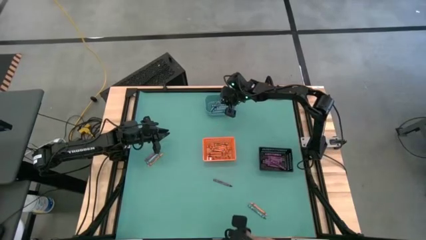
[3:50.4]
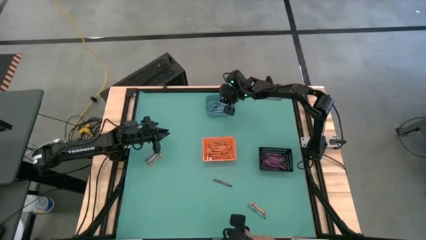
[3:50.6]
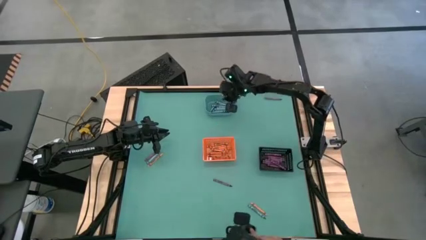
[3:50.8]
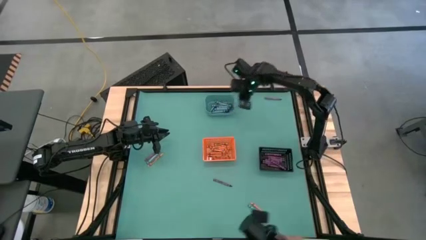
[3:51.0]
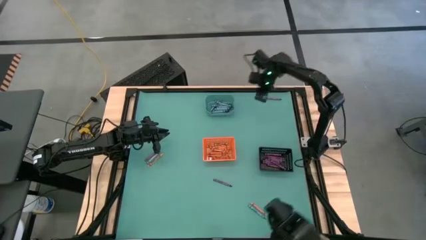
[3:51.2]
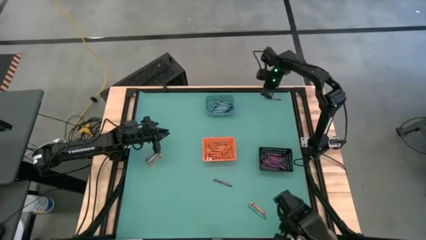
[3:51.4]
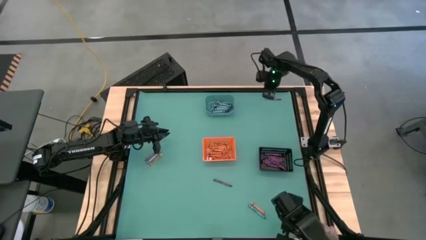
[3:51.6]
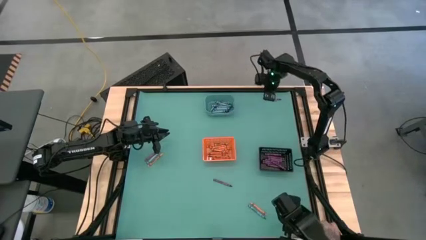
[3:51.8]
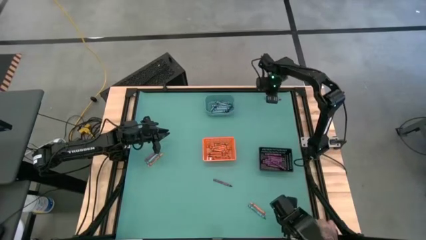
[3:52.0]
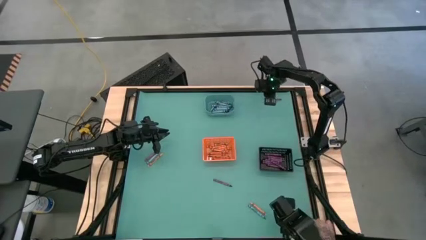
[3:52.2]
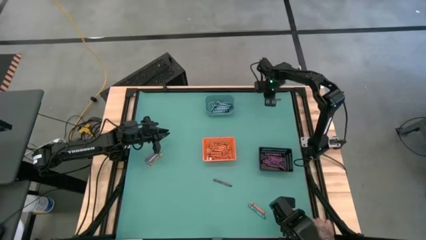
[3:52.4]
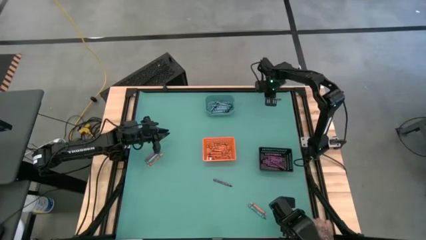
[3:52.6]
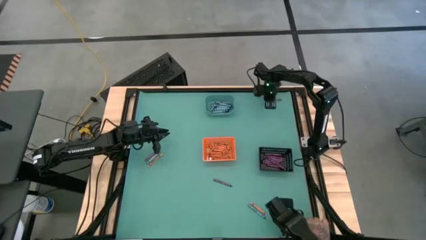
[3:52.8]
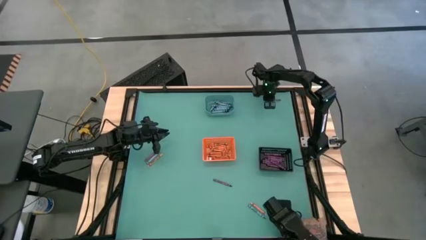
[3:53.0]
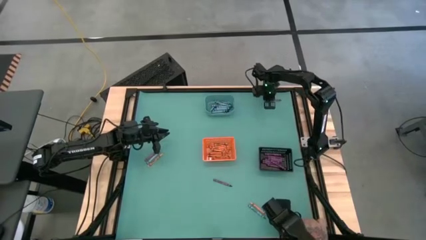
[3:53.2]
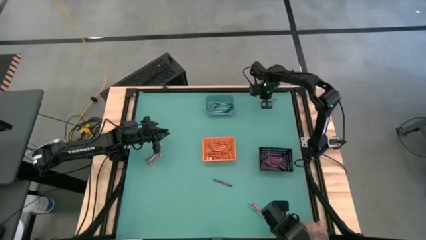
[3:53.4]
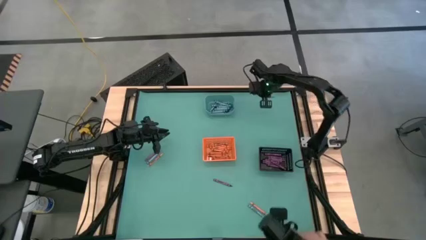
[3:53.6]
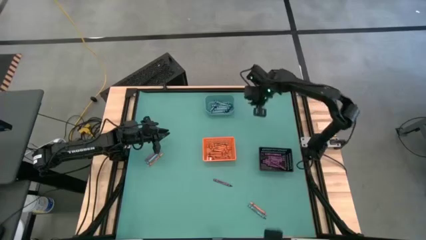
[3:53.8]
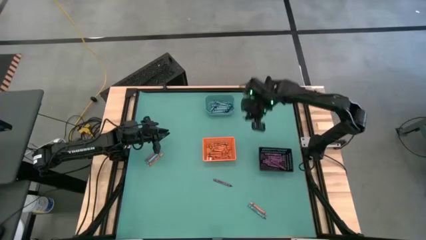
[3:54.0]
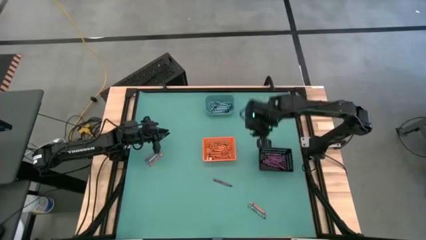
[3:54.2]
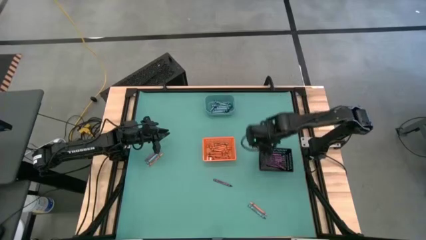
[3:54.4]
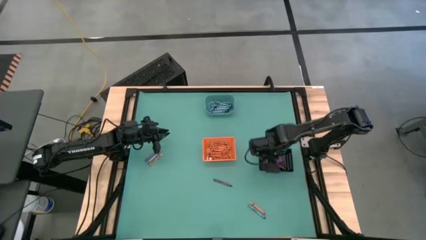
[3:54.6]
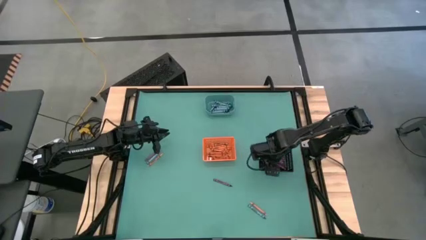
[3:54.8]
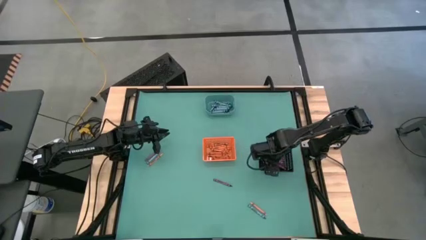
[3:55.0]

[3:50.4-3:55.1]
Task: Sort crayons
Put the violet crayon into the black bin

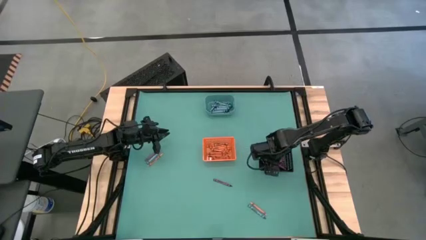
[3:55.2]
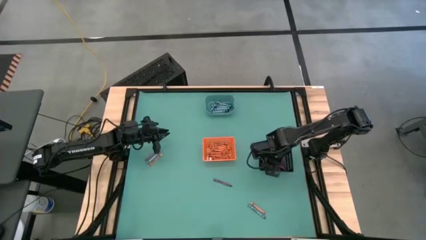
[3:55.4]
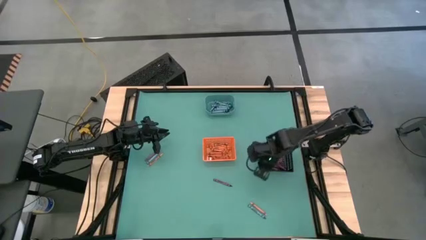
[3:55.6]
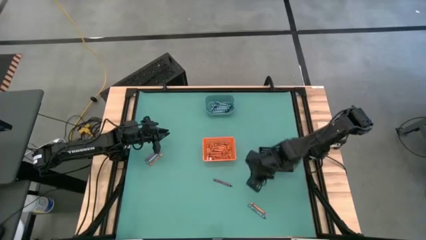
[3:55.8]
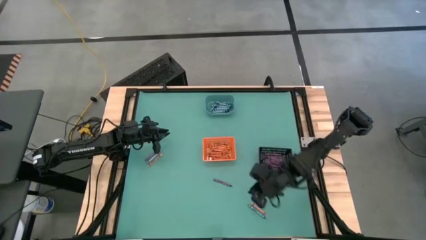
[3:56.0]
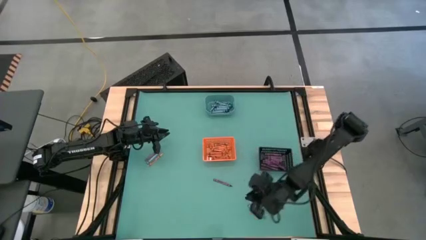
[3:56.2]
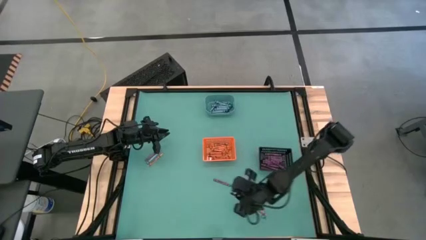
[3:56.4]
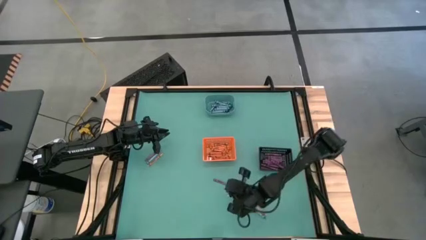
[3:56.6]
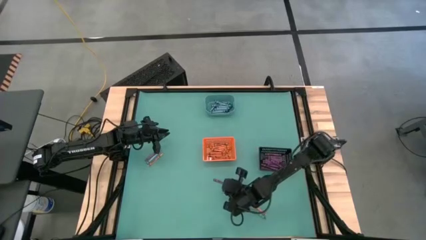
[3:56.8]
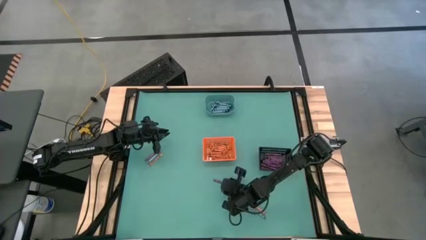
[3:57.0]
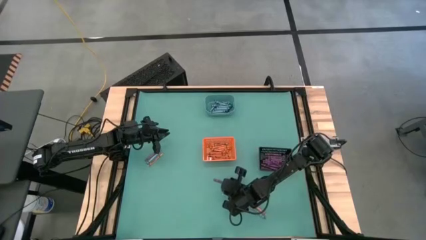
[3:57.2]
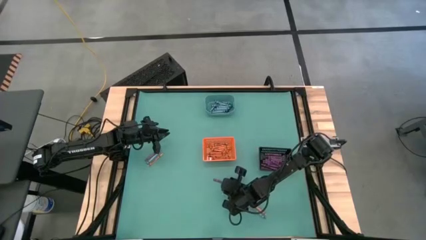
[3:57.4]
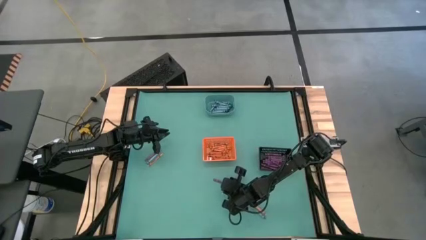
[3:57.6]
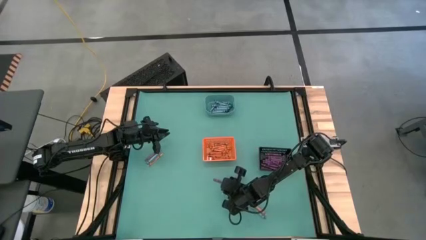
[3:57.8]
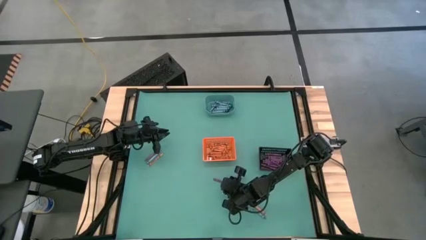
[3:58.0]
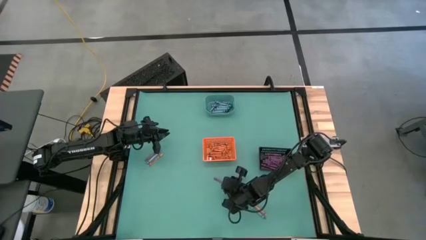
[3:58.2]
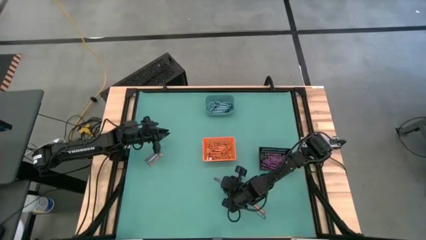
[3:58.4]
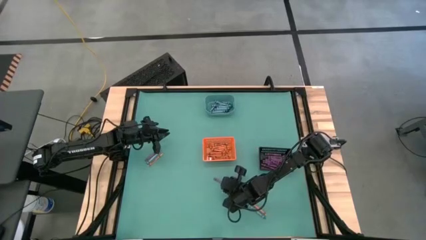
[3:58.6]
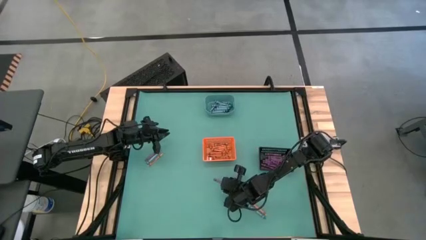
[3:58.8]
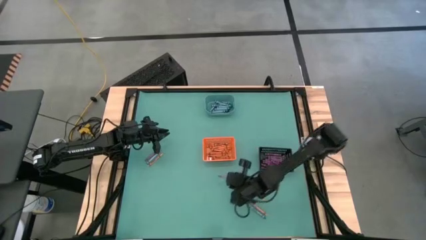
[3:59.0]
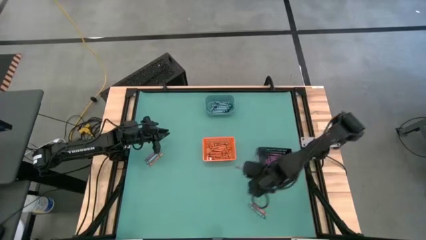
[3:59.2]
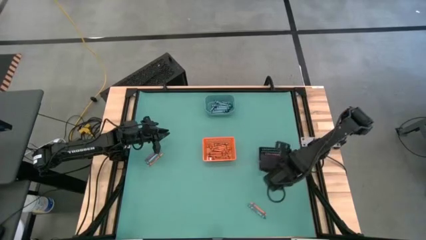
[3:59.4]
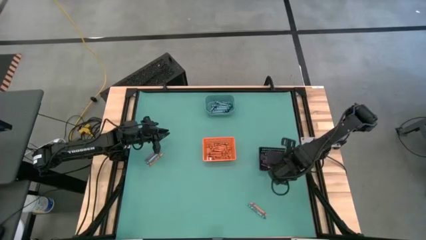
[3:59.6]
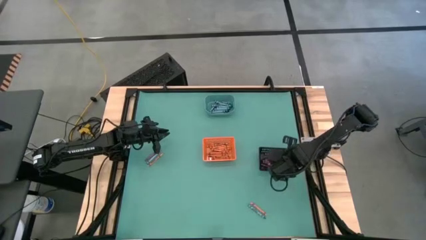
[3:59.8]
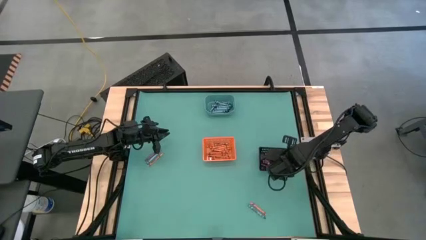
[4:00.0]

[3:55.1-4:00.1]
Put the violet crayon into the black bin

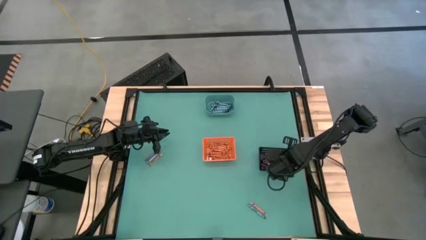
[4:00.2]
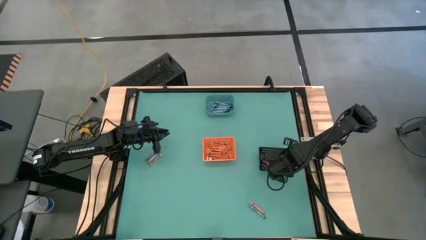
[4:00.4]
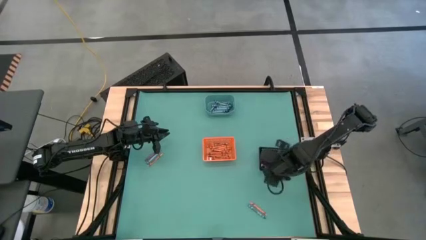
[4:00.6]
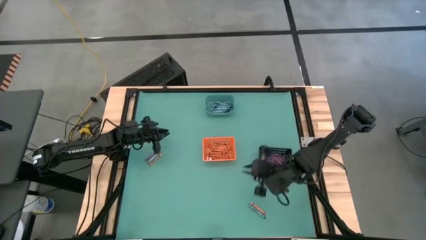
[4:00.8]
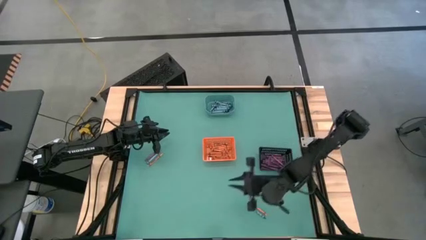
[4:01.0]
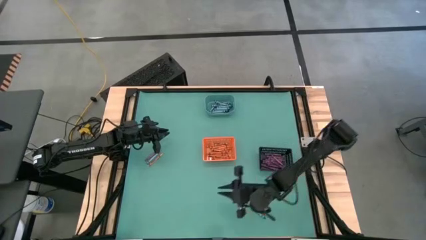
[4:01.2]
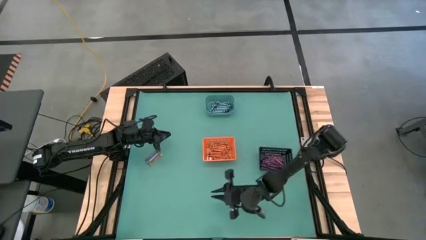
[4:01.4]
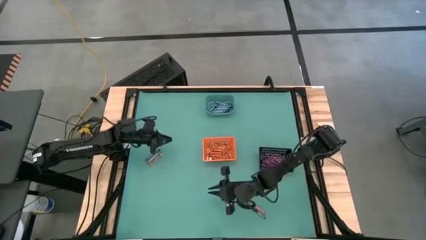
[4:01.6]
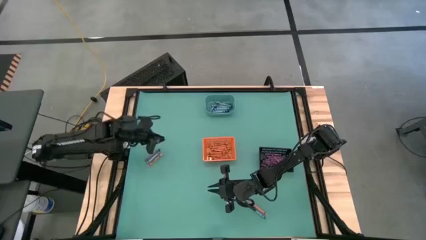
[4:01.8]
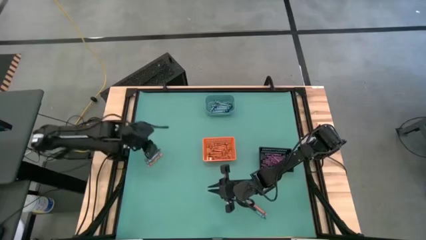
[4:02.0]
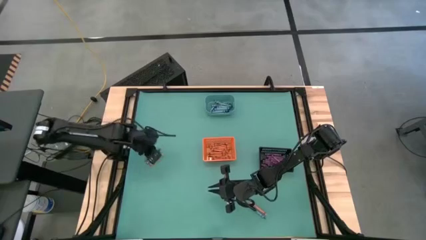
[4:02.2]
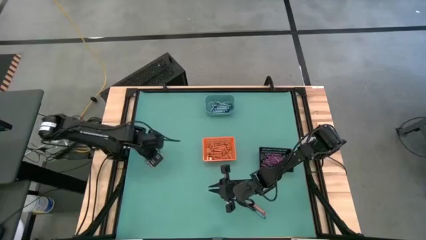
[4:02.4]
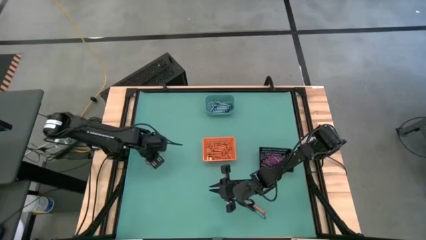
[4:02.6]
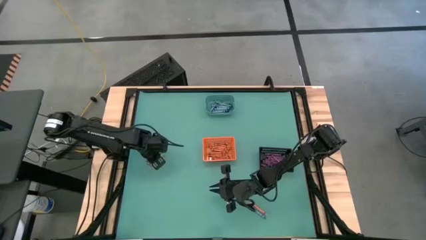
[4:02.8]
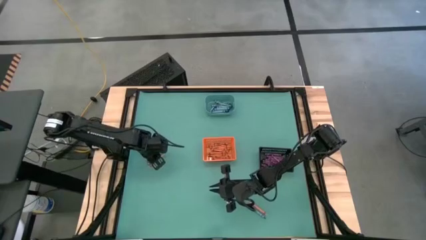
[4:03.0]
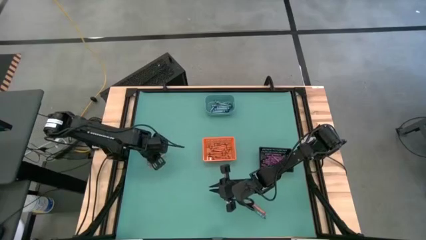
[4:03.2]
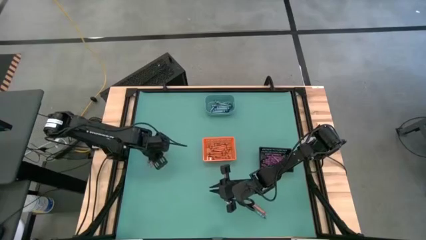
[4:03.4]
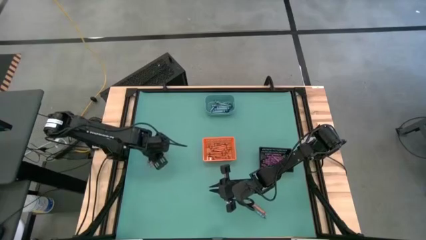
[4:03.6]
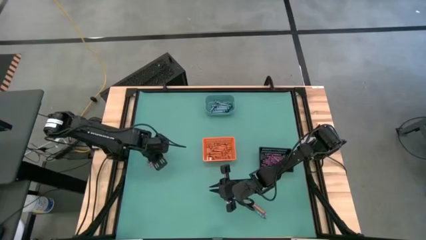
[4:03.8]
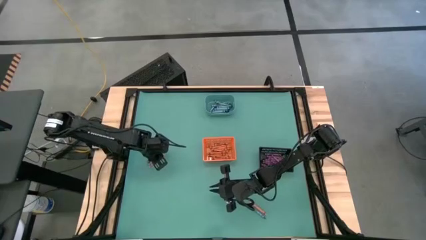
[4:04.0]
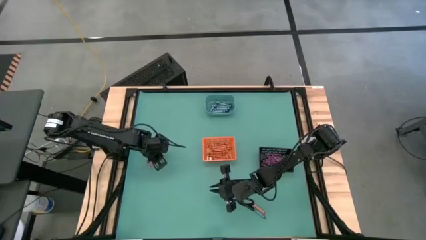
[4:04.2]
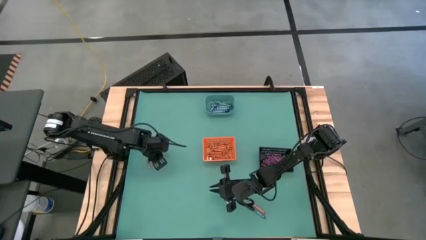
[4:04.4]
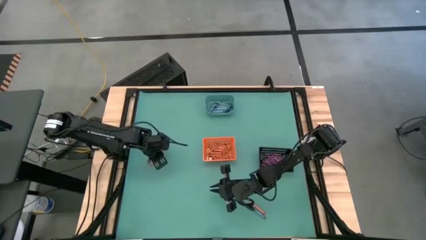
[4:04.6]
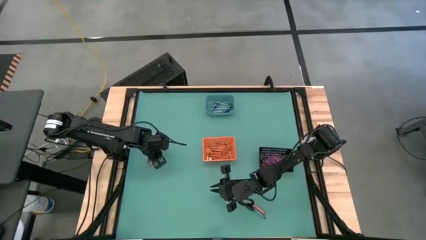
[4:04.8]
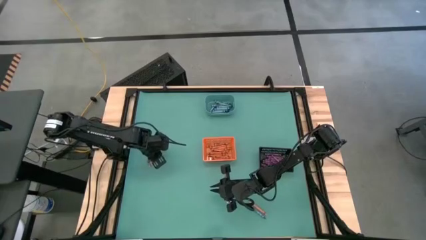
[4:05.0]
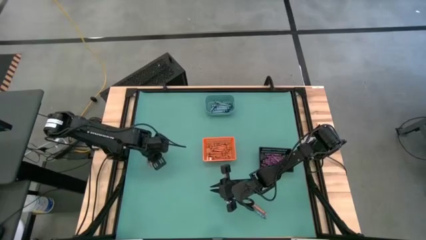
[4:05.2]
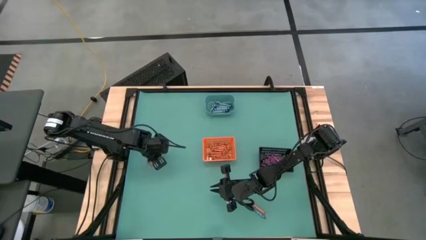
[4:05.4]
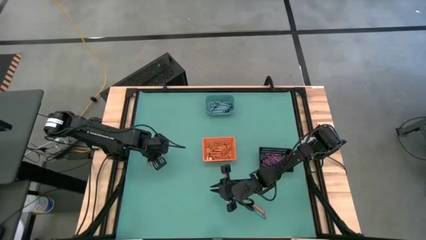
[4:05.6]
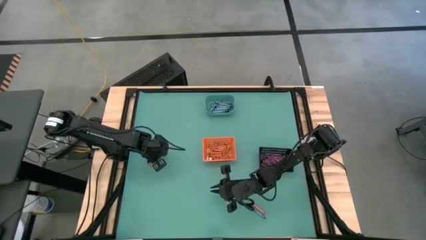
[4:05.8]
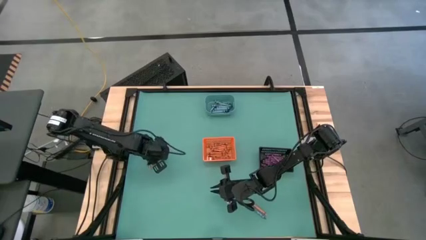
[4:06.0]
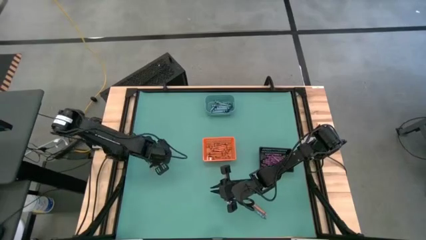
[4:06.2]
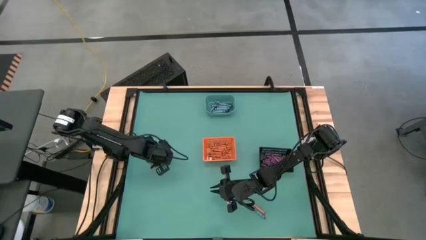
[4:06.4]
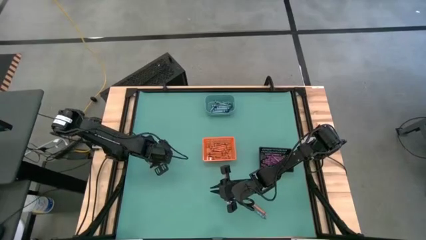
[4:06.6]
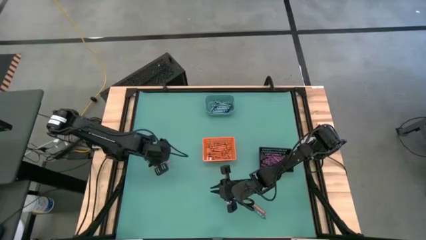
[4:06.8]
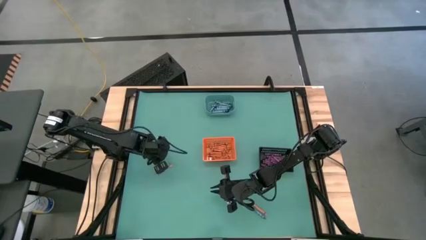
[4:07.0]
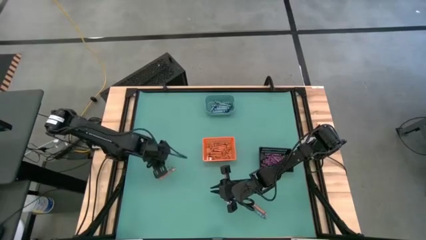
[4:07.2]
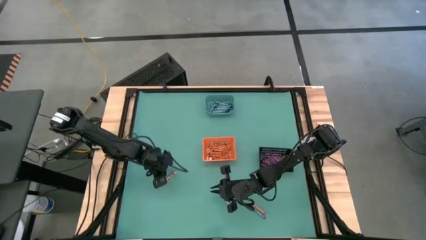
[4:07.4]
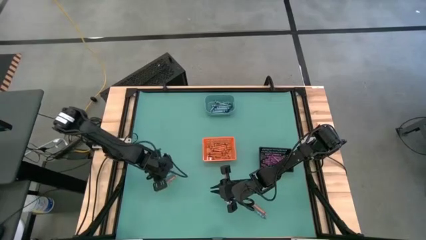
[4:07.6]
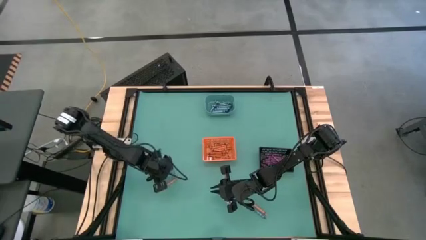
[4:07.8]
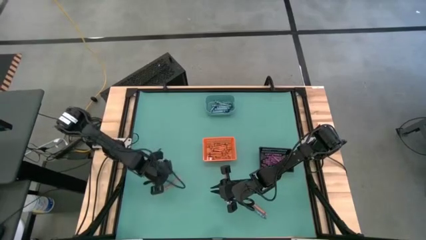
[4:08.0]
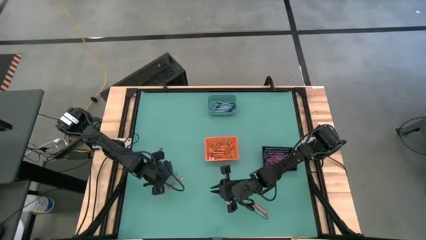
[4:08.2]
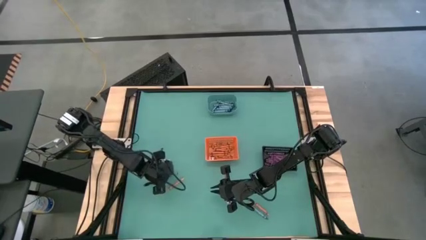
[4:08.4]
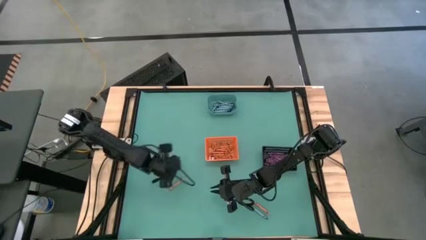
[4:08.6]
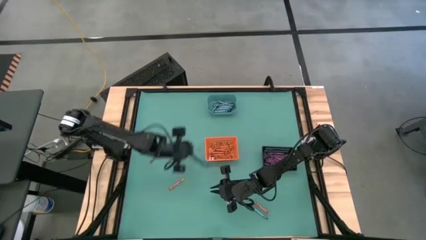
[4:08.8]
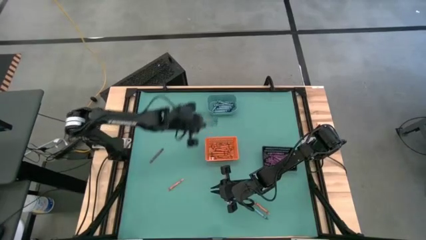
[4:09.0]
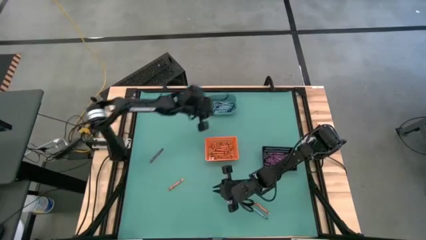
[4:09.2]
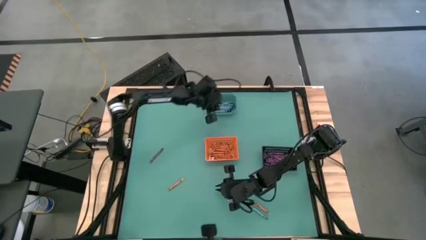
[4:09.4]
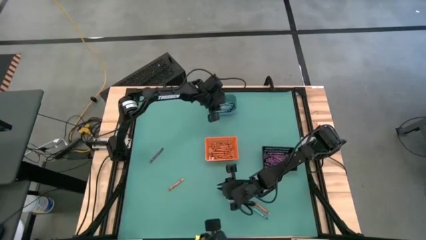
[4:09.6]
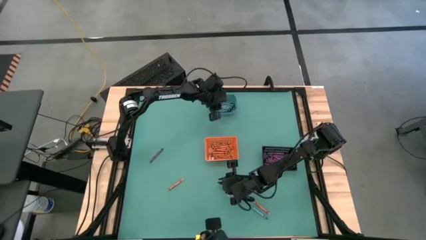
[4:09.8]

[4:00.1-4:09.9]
Put the blue crayon into the blue bin
